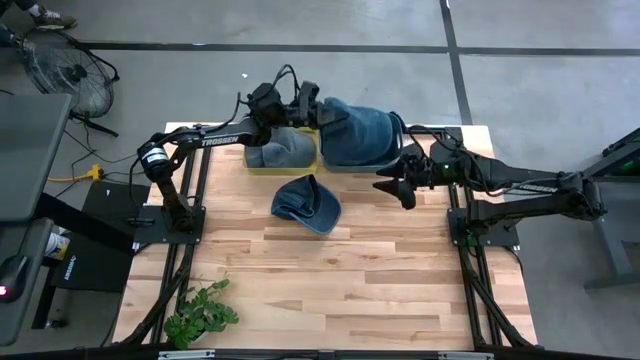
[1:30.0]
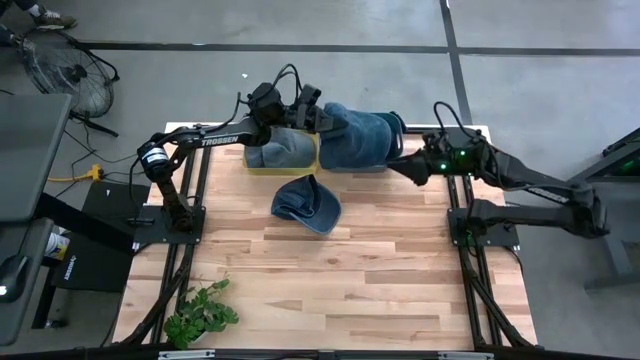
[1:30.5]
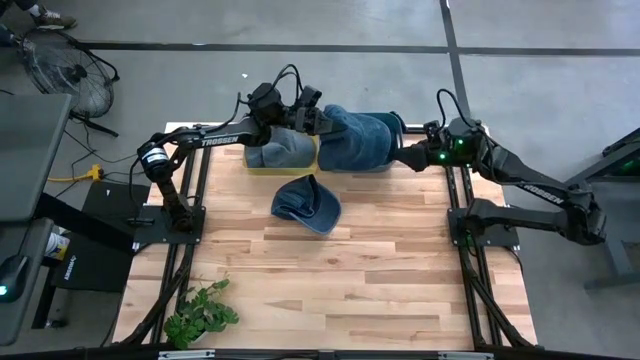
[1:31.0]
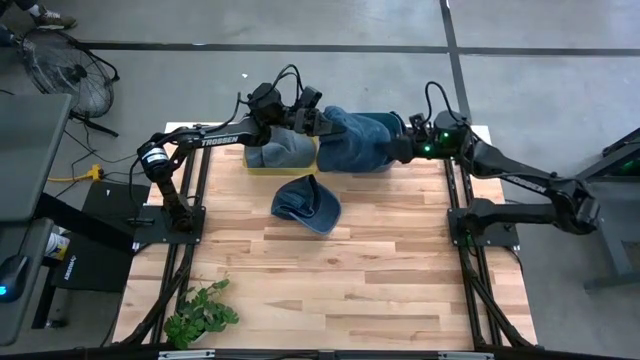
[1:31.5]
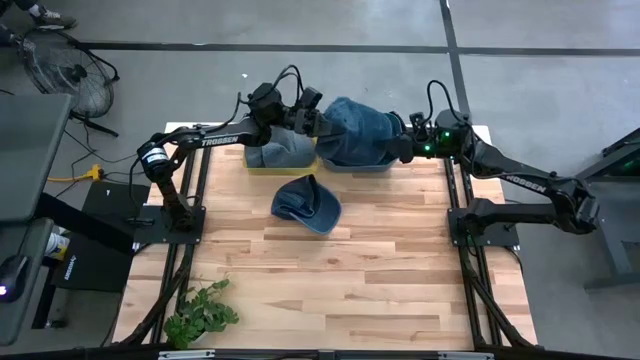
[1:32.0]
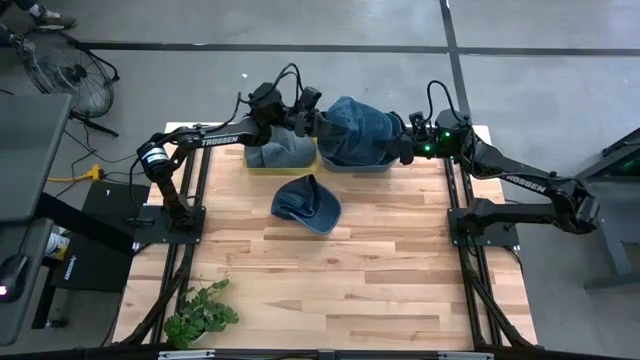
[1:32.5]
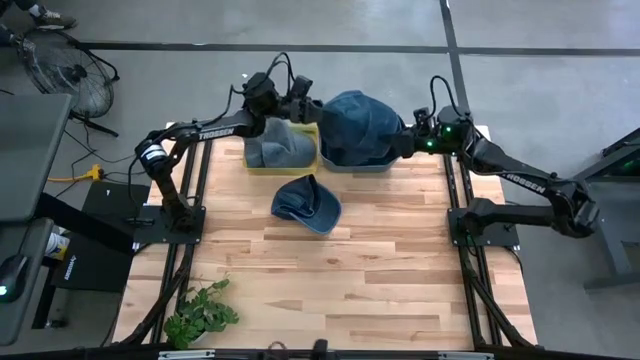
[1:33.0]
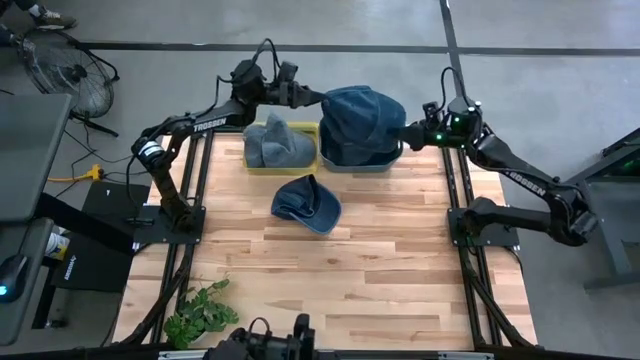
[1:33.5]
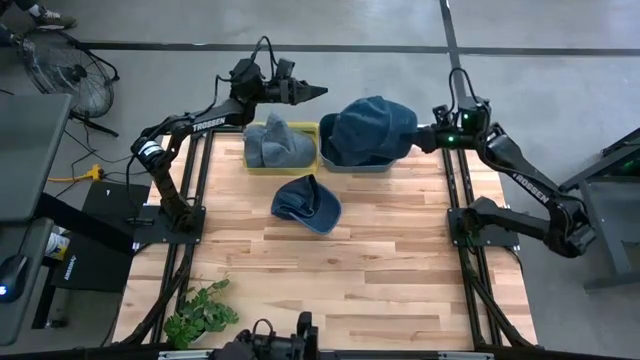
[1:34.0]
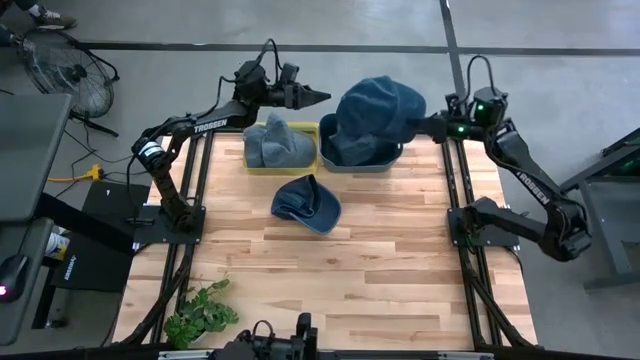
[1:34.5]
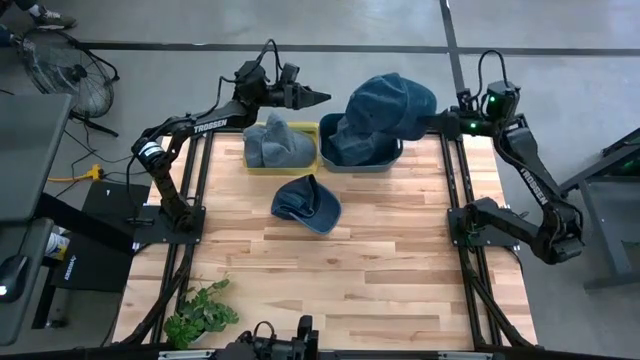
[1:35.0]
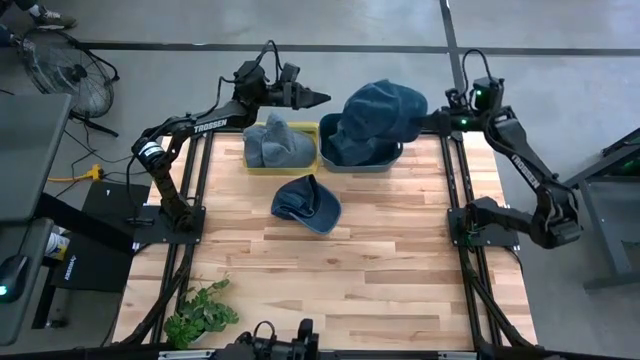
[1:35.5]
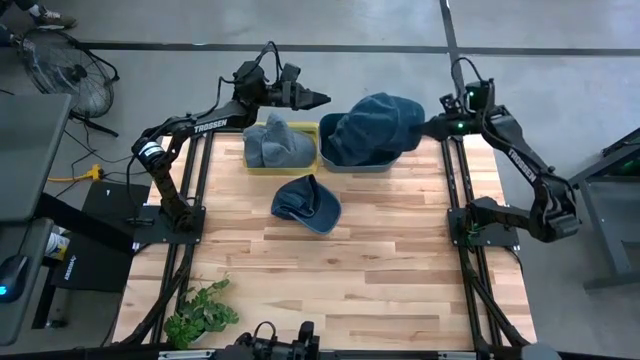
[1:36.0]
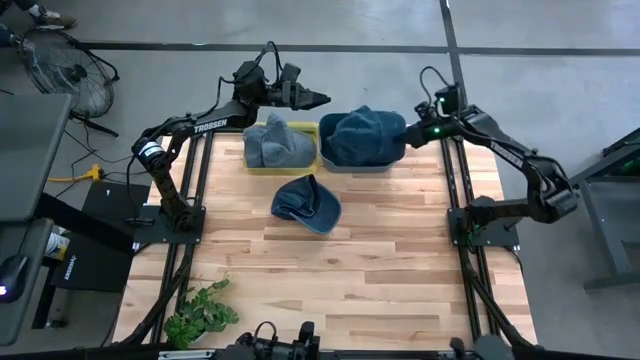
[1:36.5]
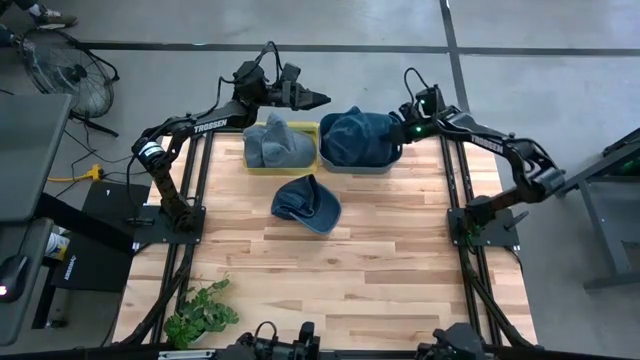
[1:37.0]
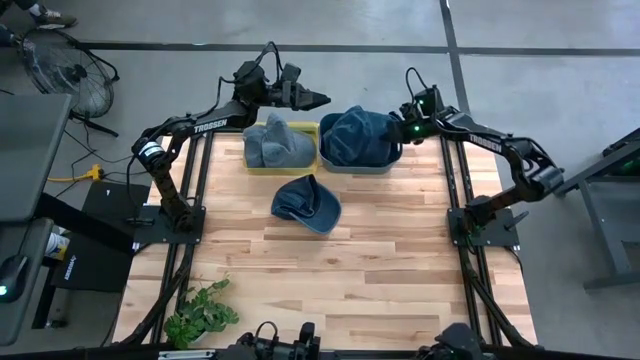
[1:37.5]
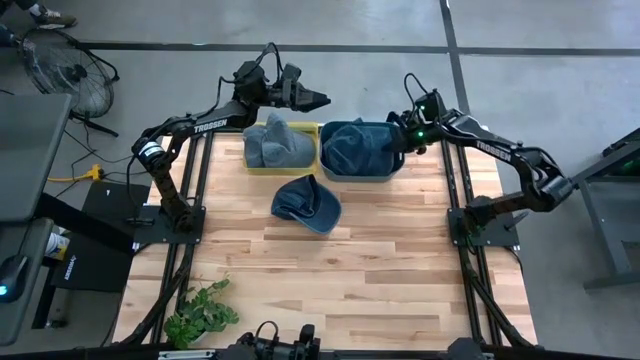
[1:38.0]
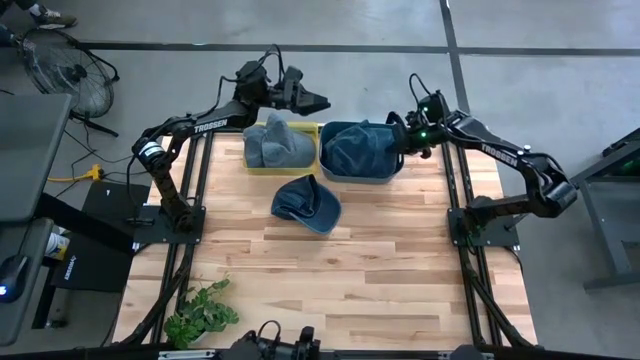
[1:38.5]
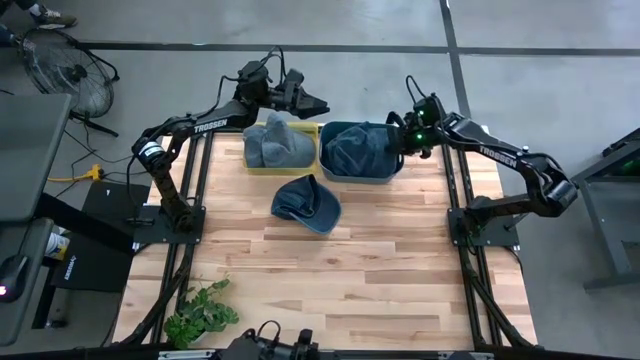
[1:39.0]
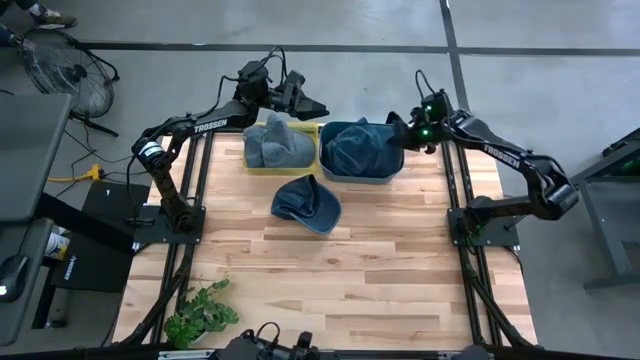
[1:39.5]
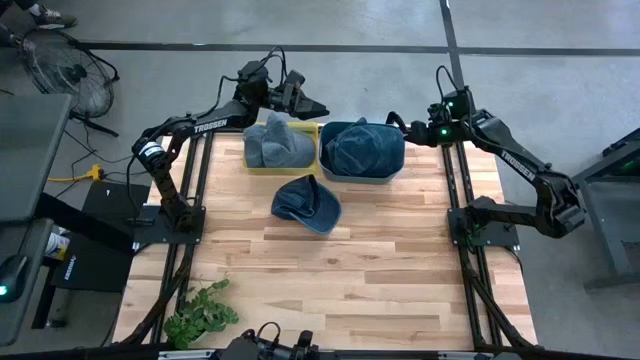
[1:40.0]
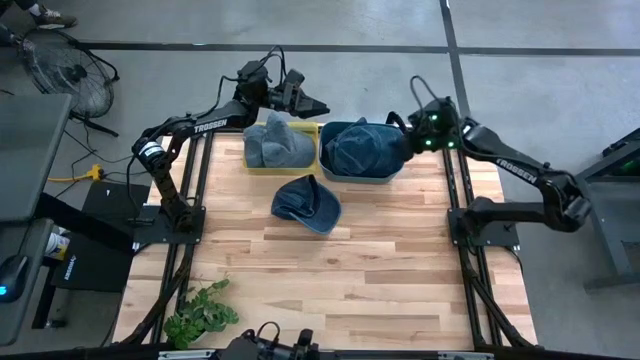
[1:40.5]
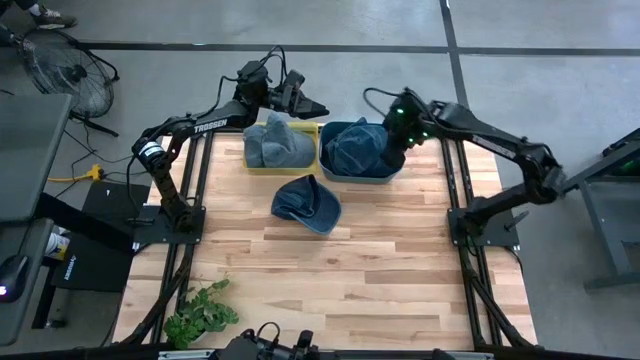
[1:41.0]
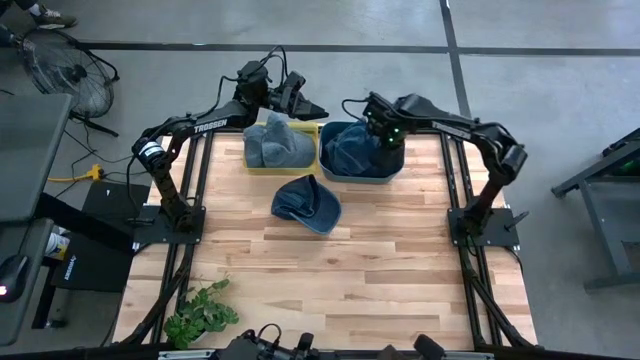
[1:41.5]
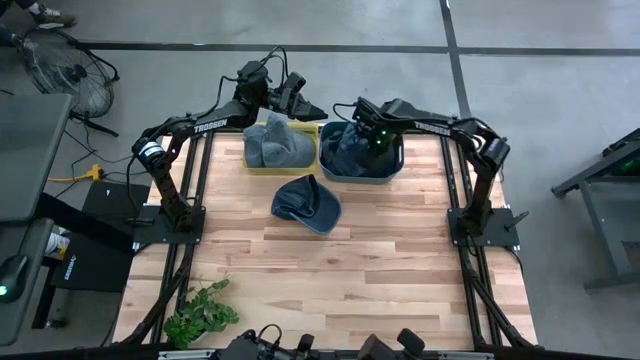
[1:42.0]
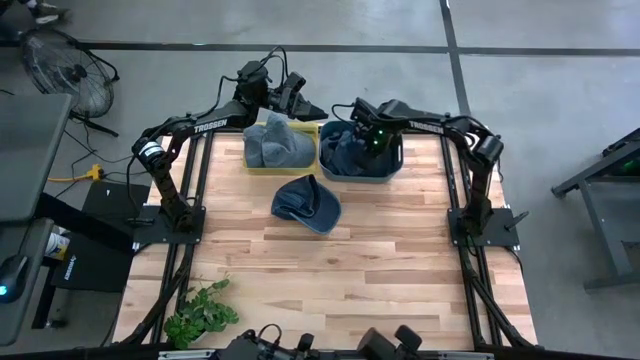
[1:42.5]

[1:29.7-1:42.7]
Task: Pick & Place hat
Put the right blue cap into the blue bin

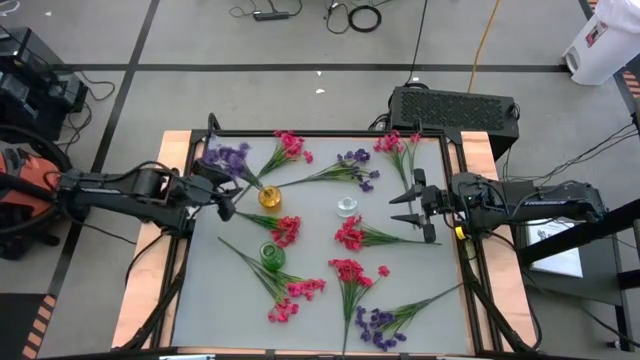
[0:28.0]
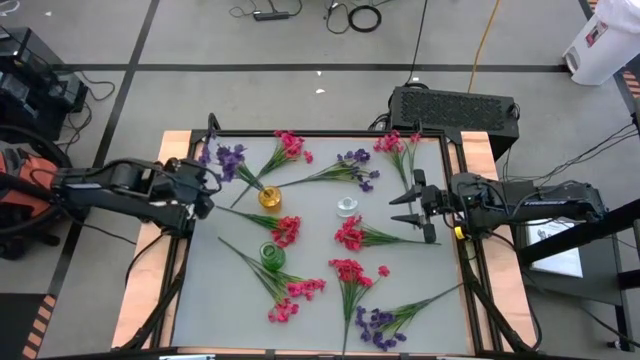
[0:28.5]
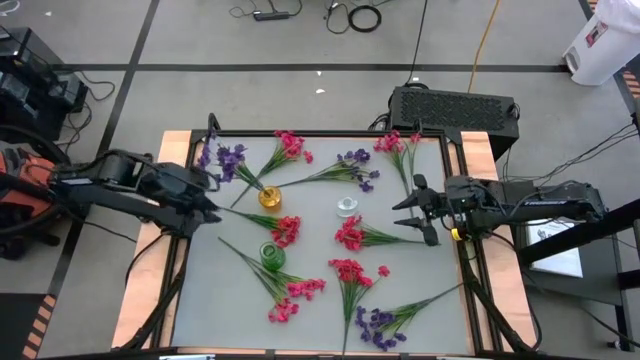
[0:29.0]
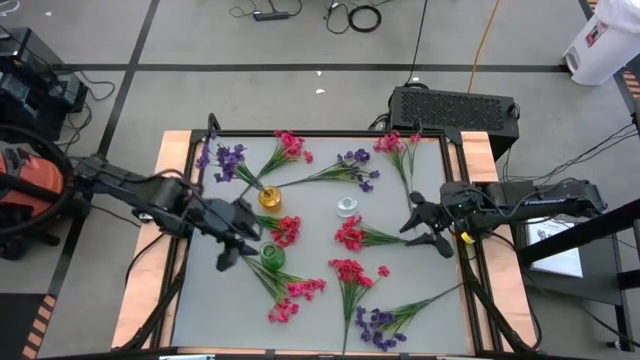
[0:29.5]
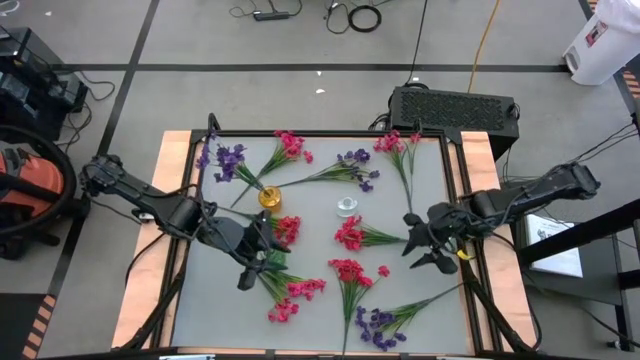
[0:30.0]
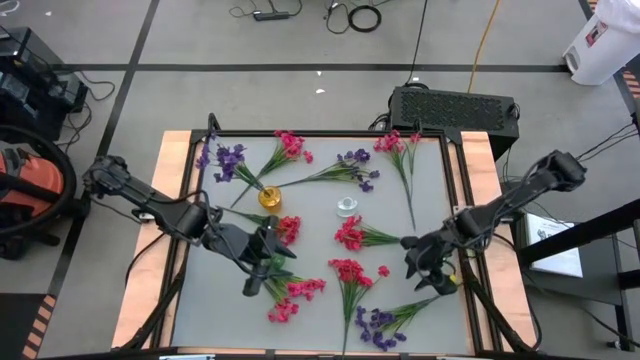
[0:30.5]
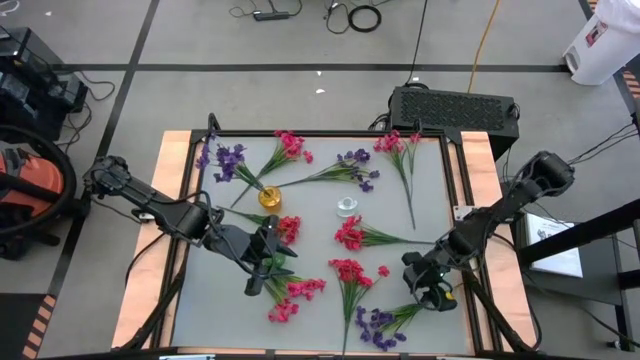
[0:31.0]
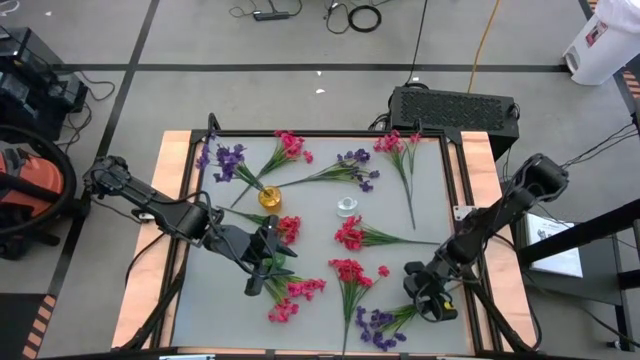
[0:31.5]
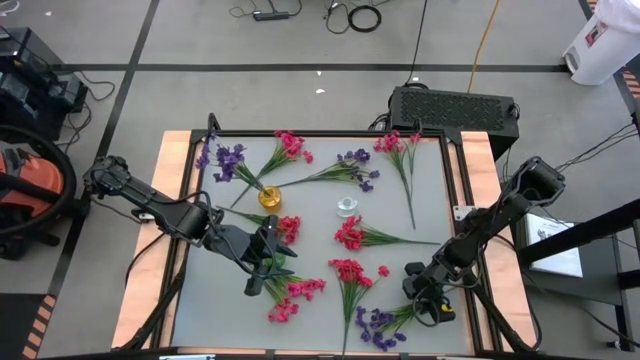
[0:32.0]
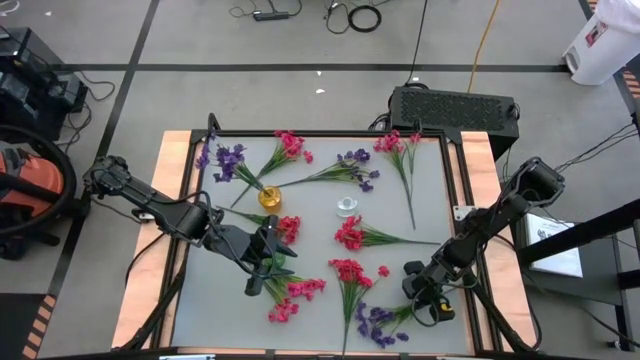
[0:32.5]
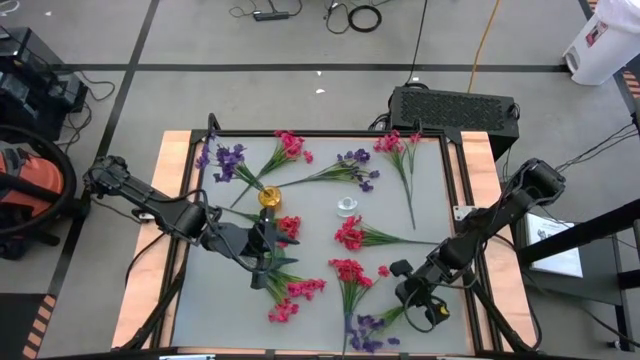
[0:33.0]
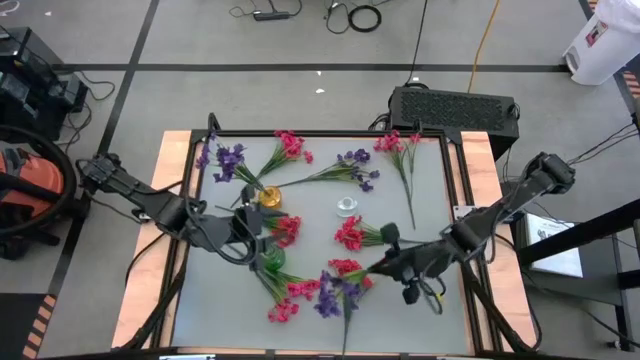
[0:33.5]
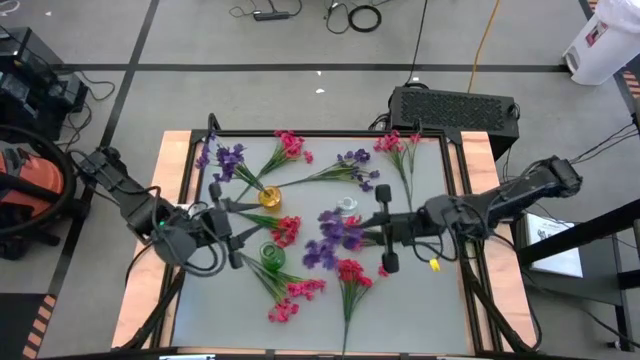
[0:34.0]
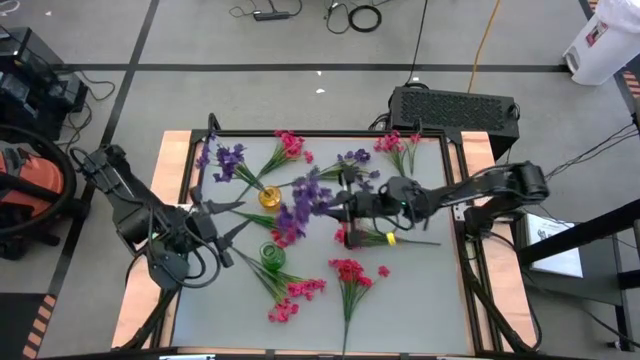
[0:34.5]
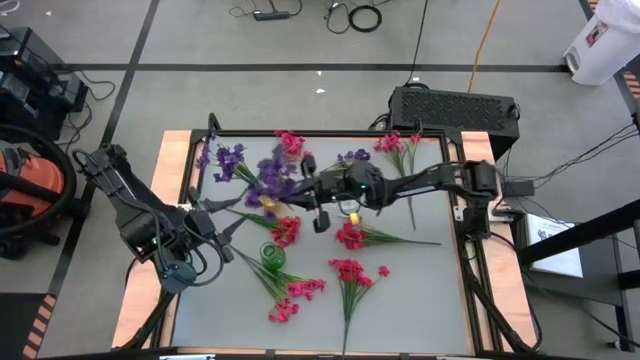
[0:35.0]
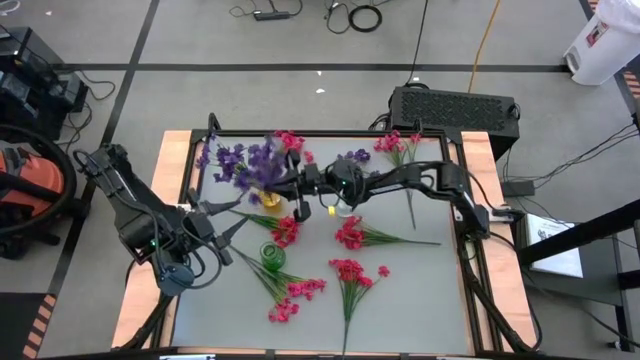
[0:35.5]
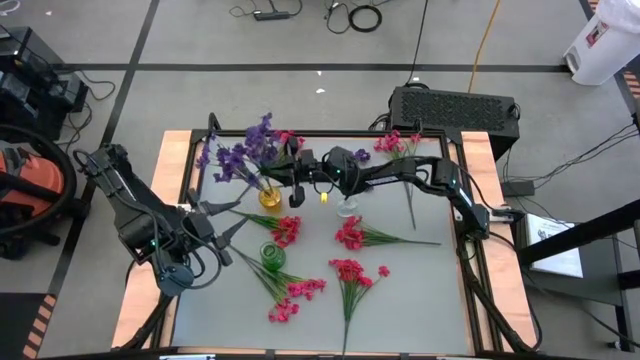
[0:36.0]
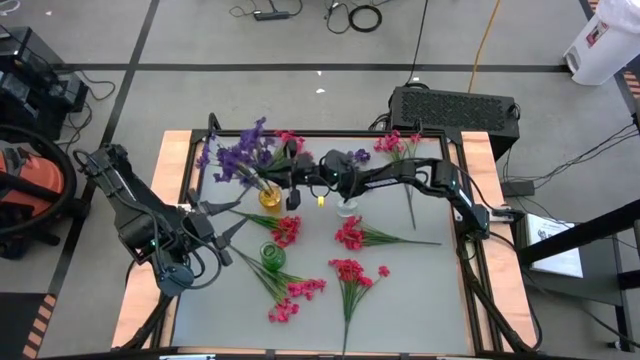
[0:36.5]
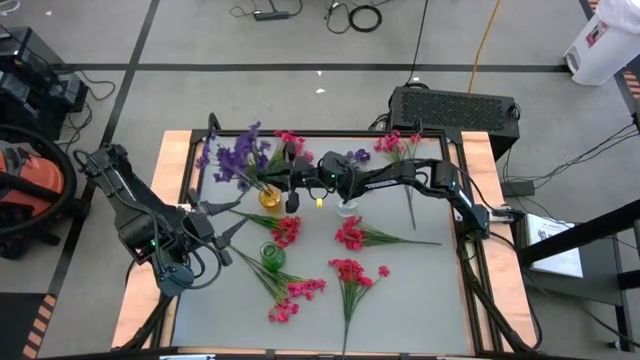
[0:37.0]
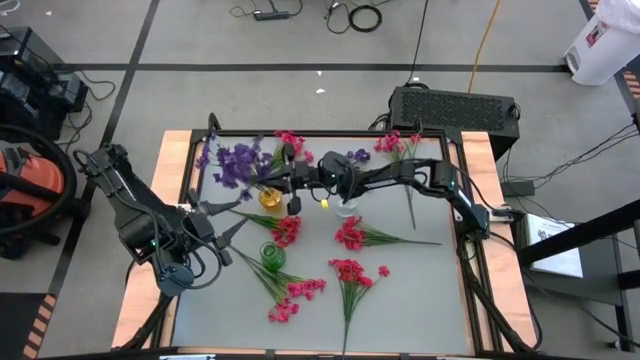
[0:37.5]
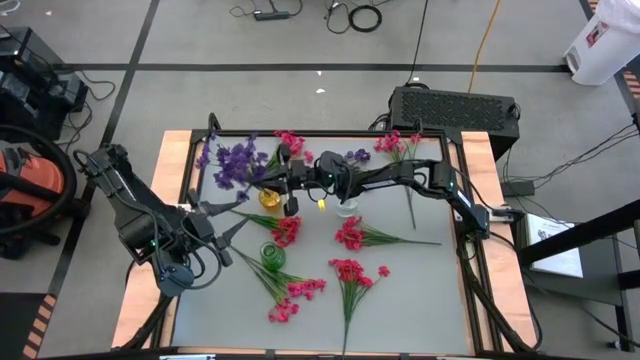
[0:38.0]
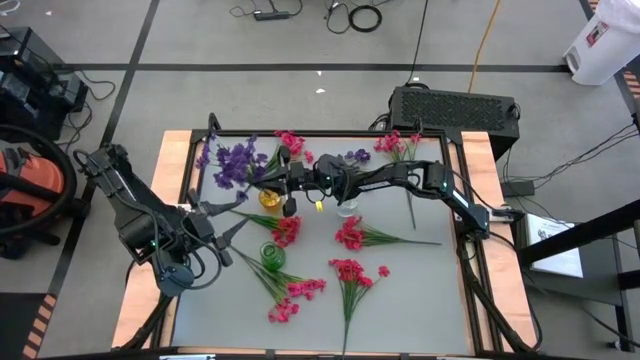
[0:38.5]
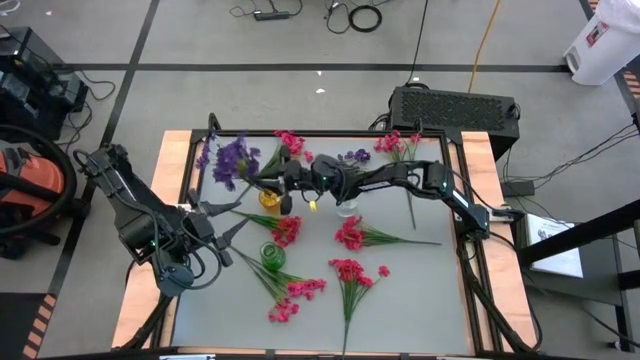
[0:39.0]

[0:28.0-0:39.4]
Task: Sort flowers into vase by color
Put the bottom violet flowers into the yellow vase
